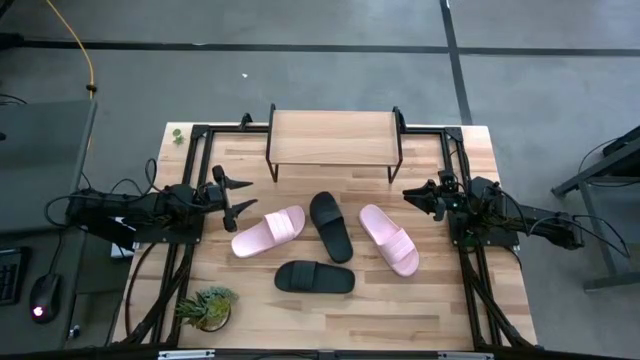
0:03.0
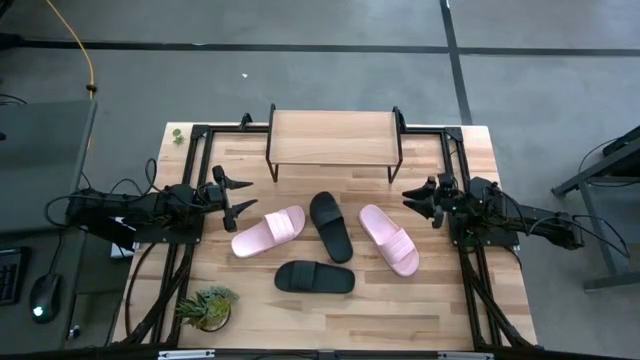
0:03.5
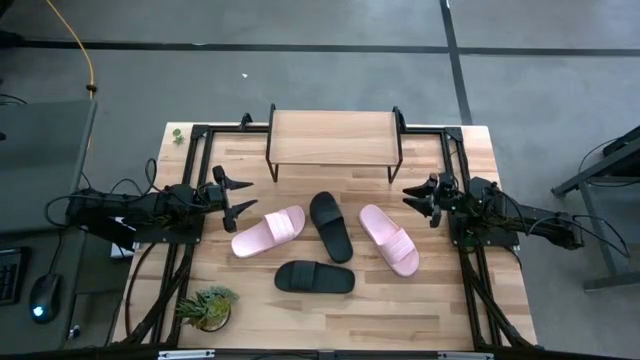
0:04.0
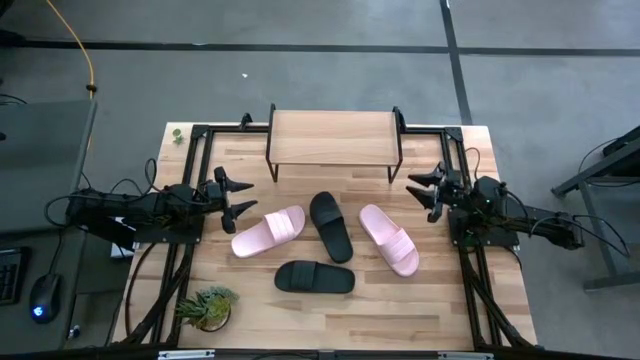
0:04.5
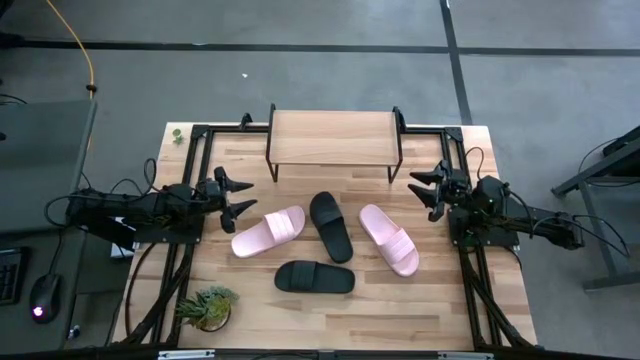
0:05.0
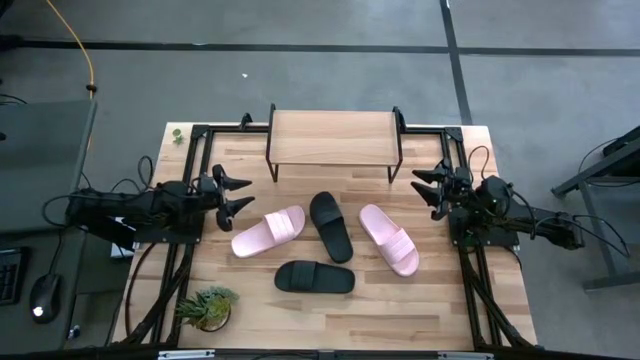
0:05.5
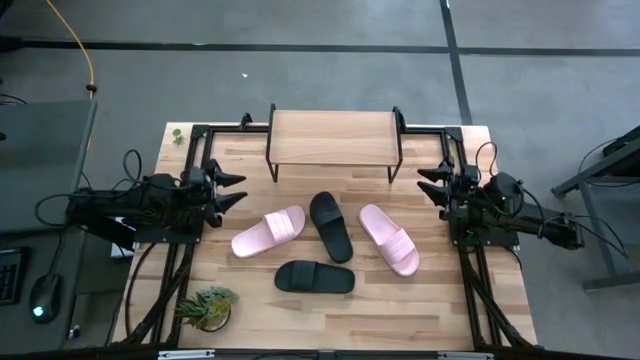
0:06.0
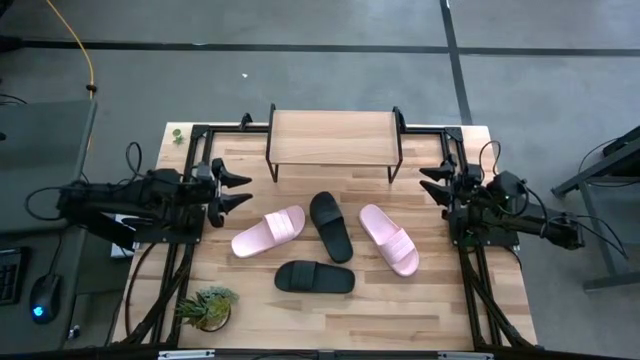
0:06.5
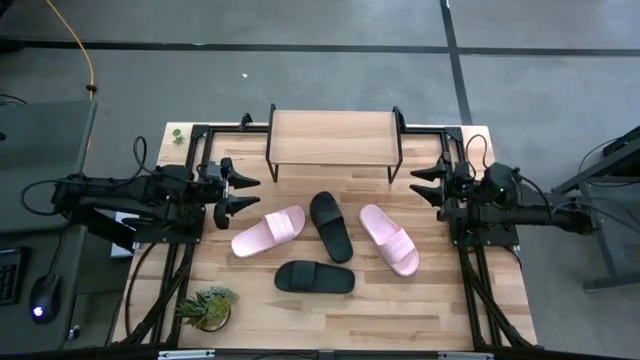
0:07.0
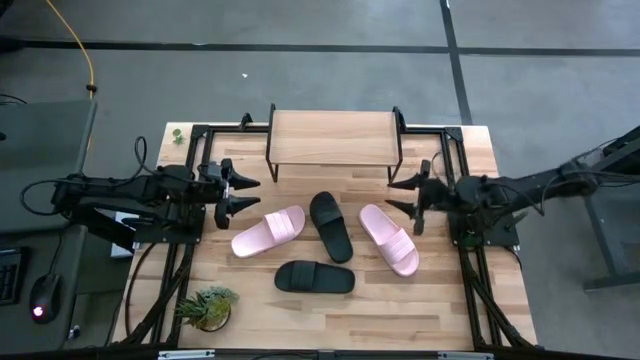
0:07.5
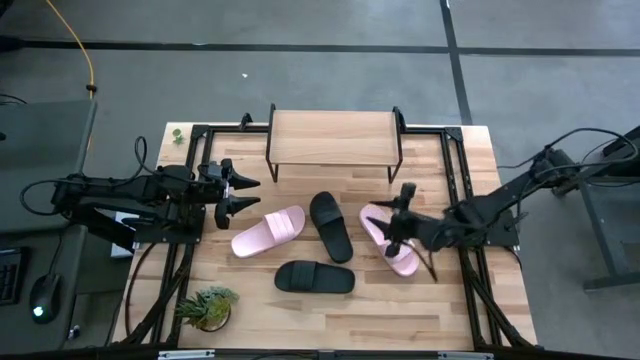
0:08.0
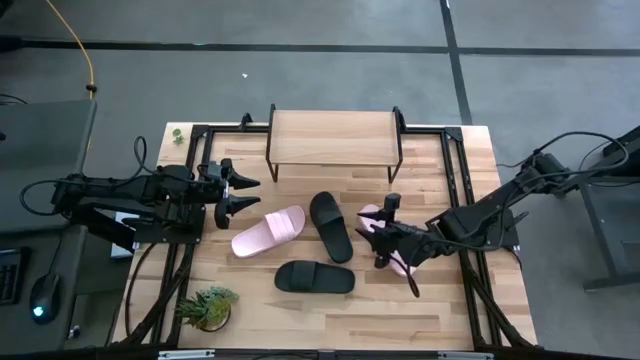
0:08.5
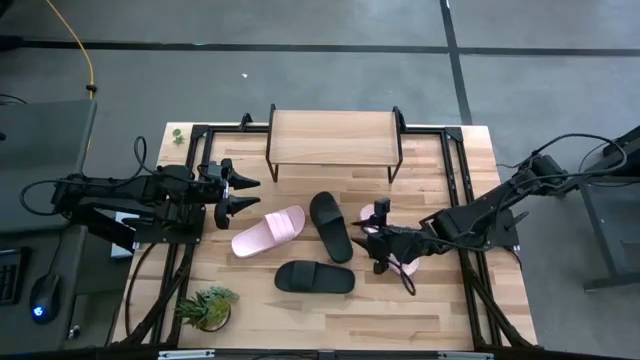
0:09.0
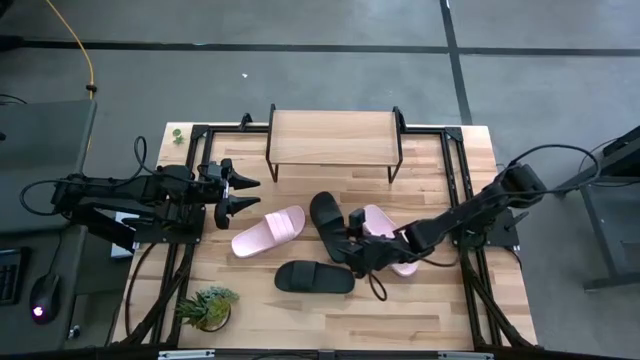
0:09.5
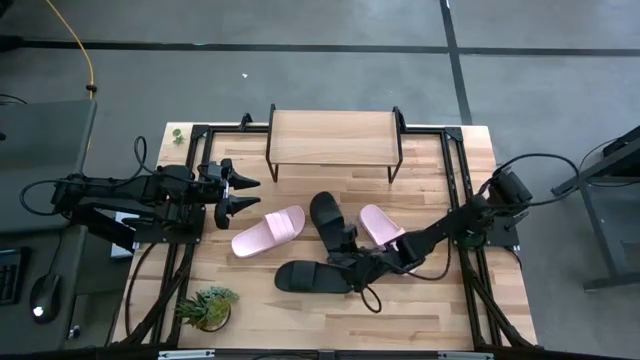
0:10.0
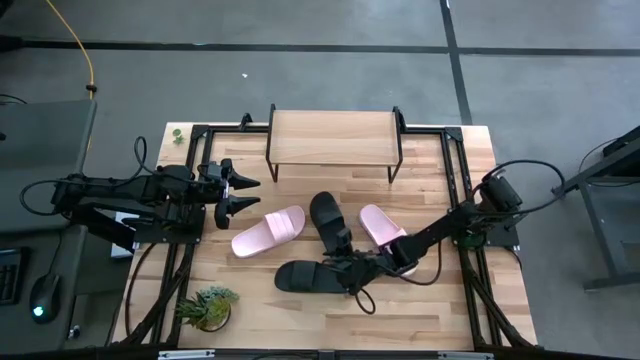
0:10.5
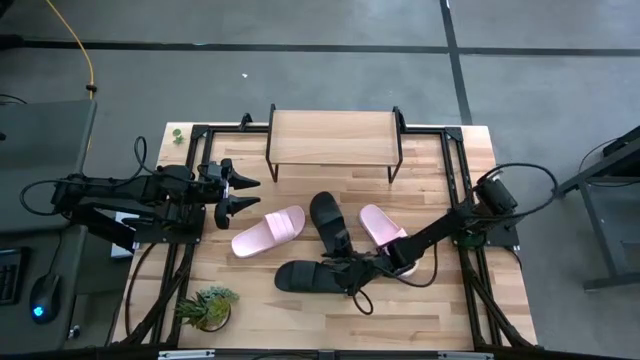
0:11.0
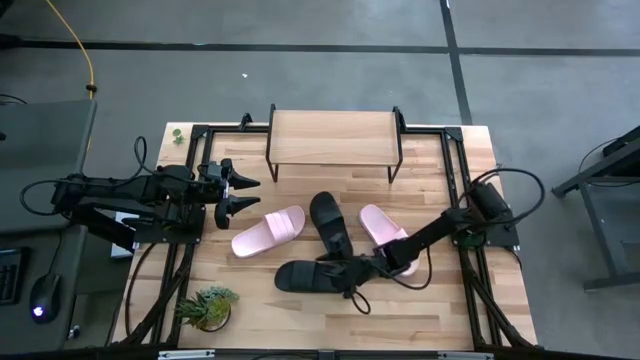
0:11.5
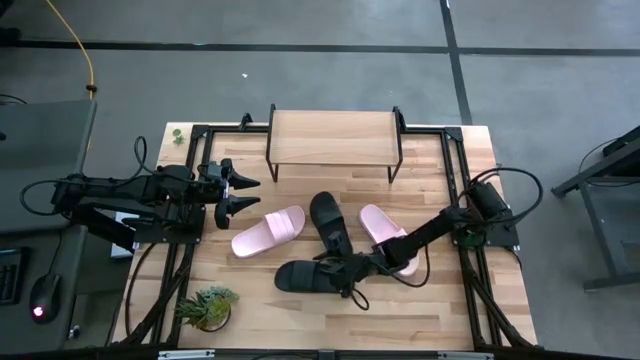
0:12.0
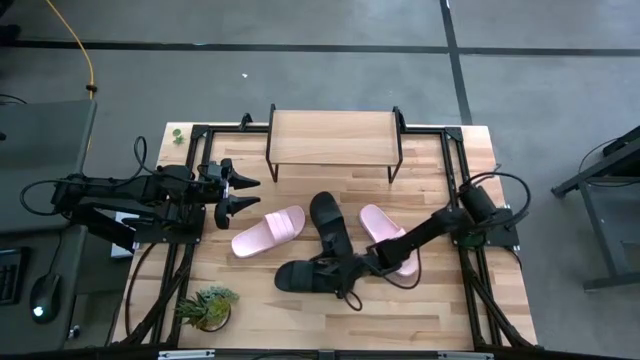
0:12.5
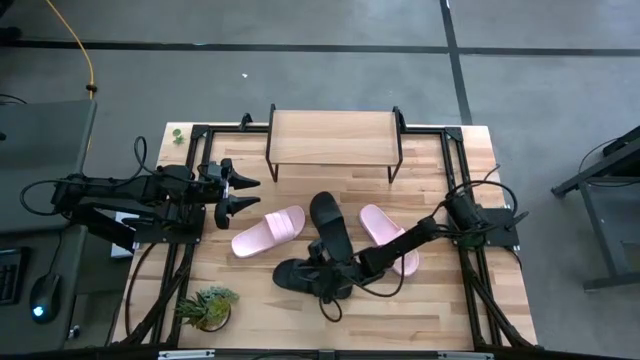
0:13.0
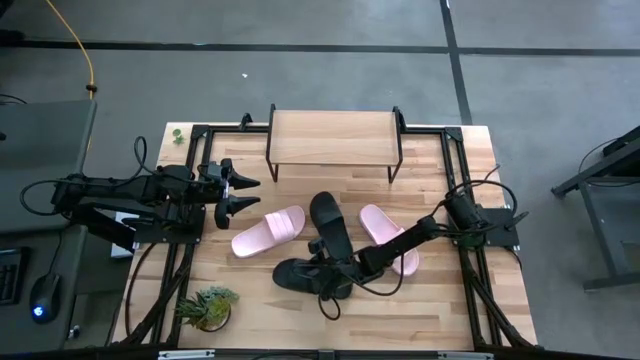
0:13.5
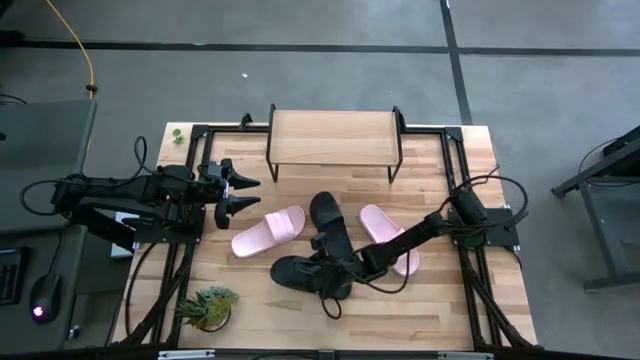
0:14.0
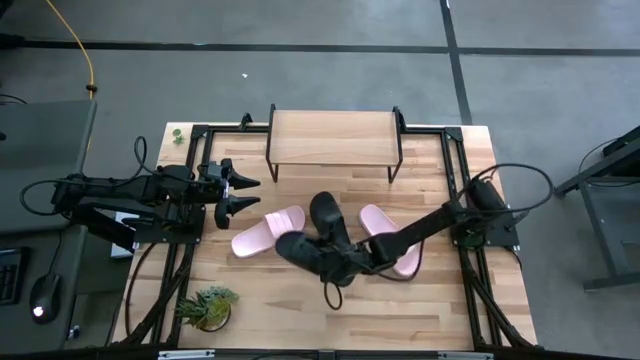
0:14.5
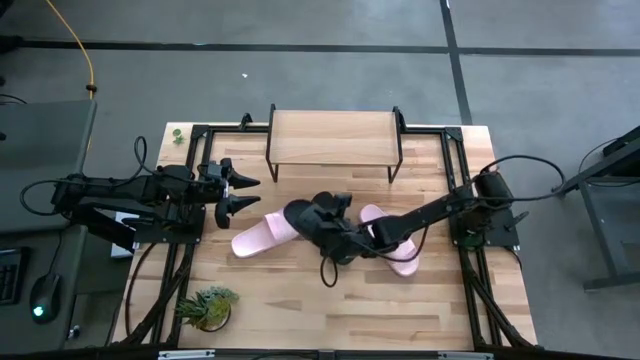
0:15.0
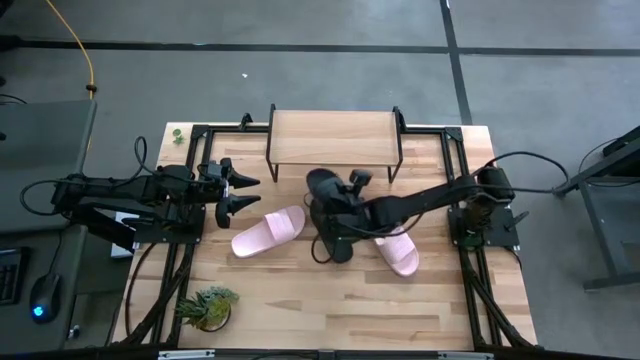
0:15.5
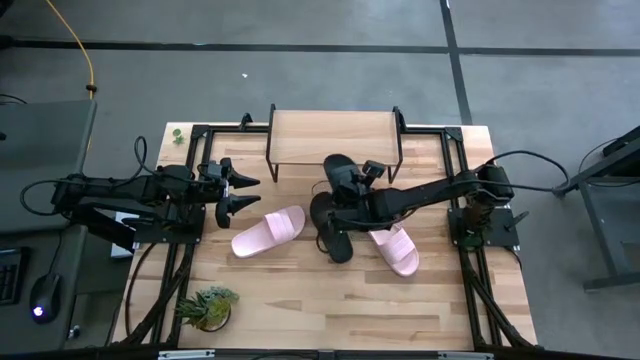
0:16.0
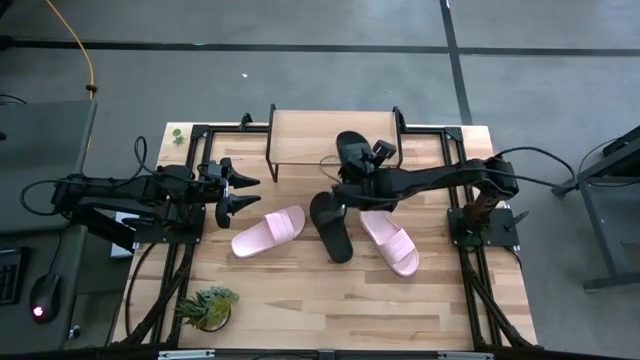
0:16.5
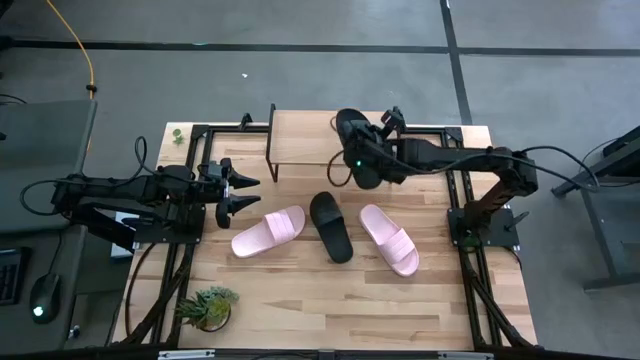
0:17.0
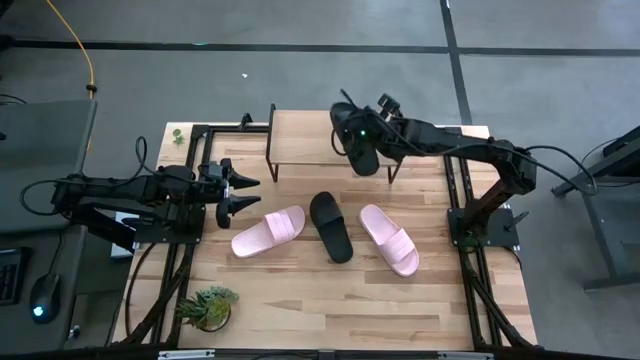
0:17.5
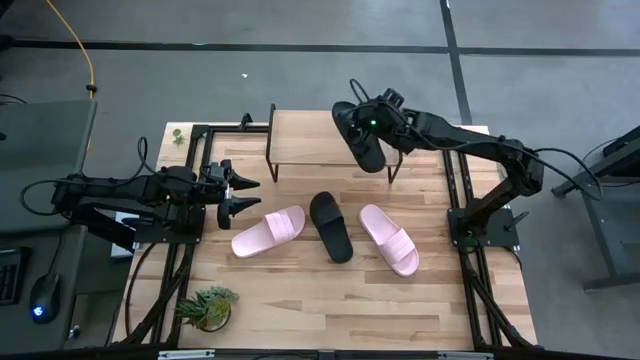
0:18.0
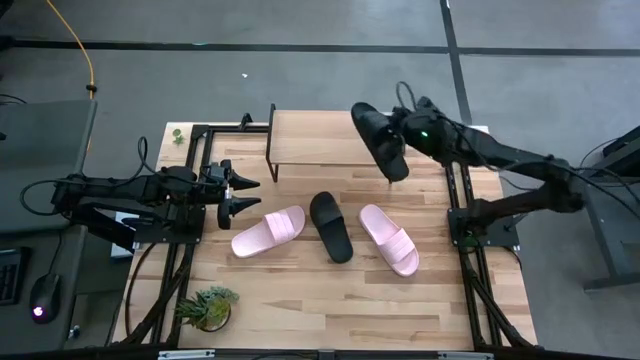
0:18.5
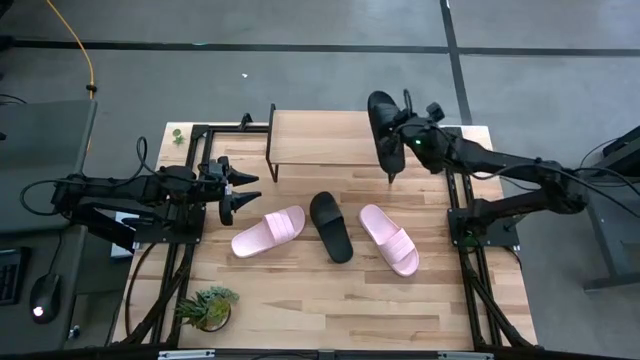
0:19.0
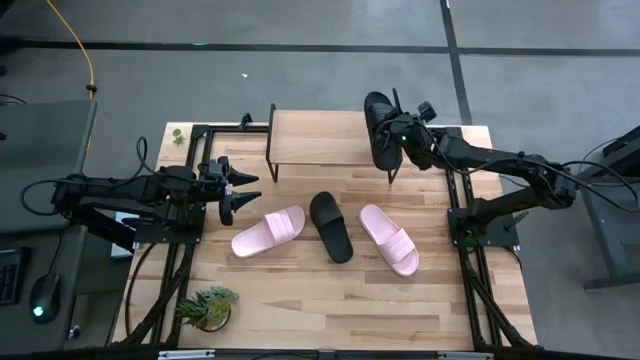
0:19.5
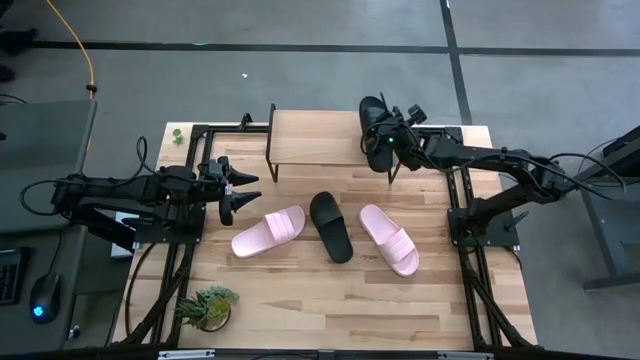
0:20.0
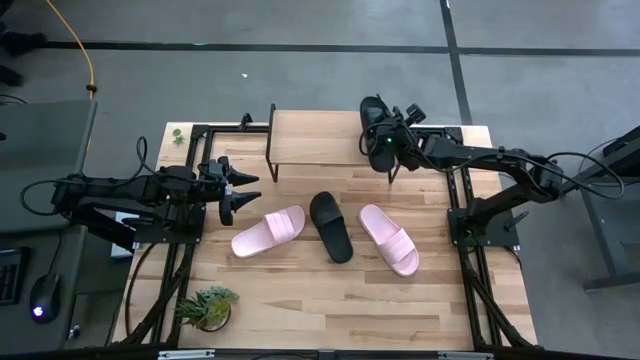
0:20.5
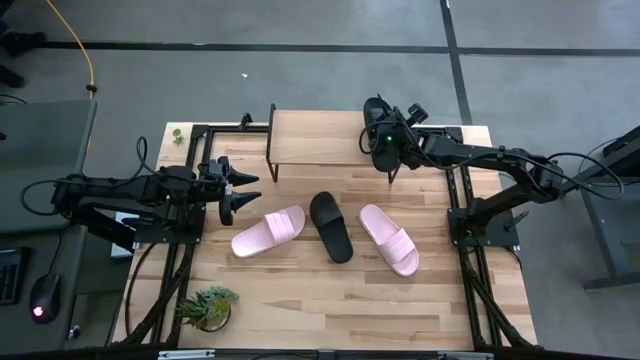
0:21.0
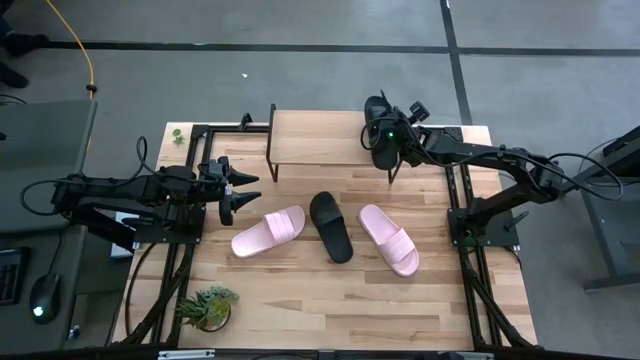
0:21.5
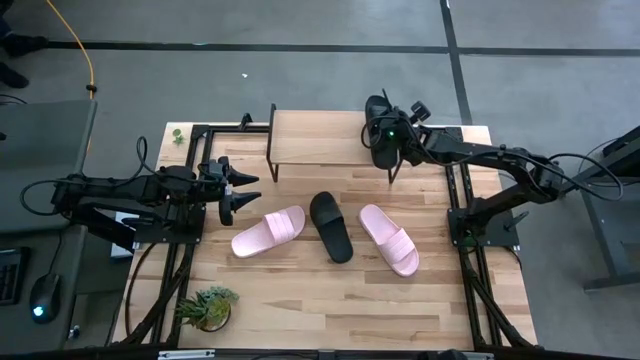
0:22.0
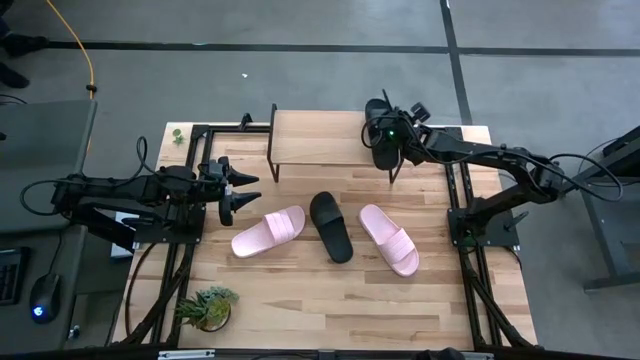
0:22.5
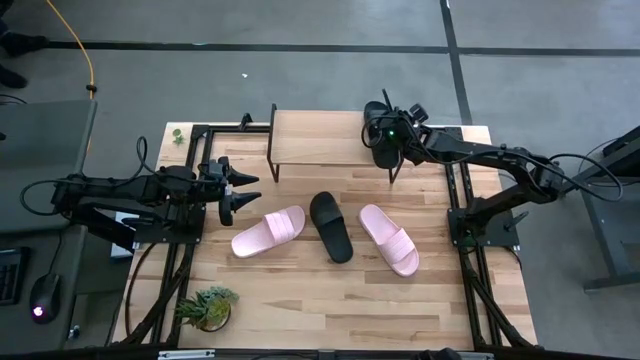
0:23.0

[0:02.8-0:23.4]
Task: Pick and place slides into the shelf
Put the bottom black slide on the shelf
